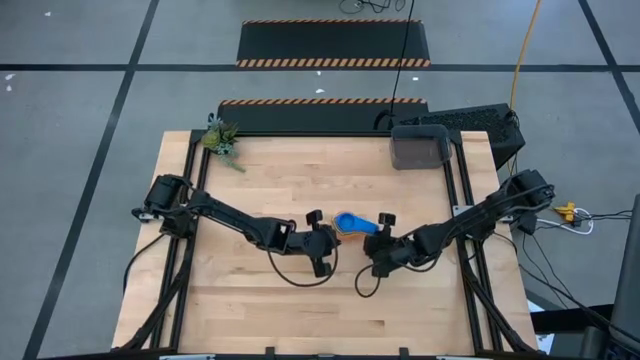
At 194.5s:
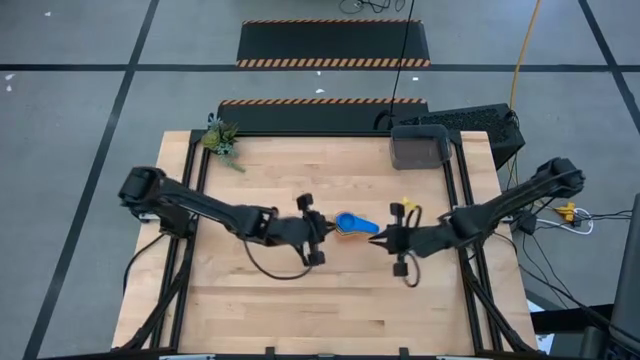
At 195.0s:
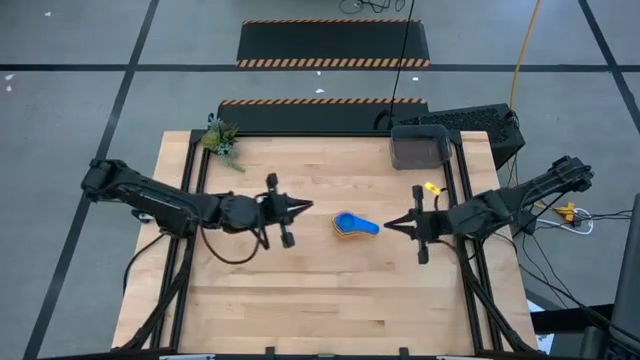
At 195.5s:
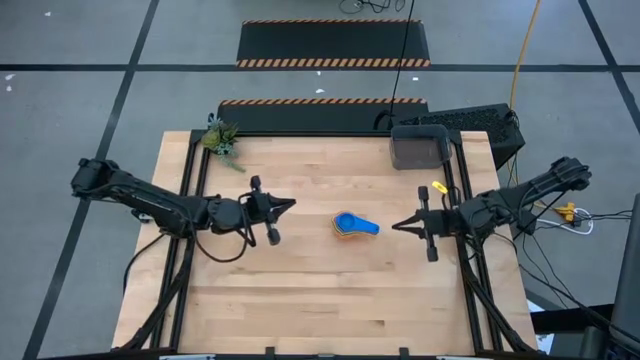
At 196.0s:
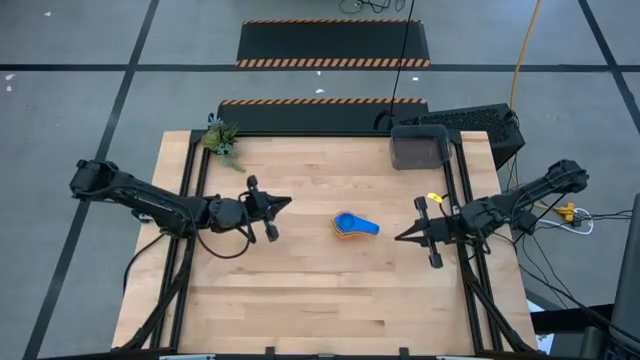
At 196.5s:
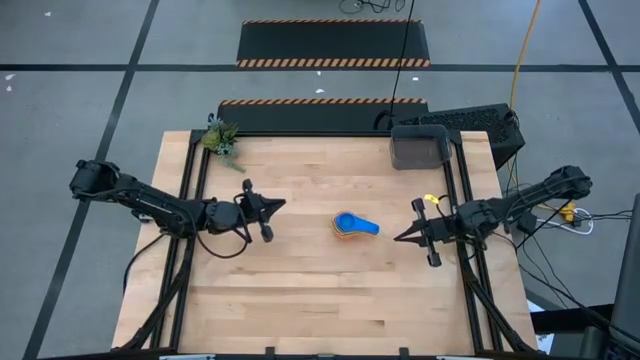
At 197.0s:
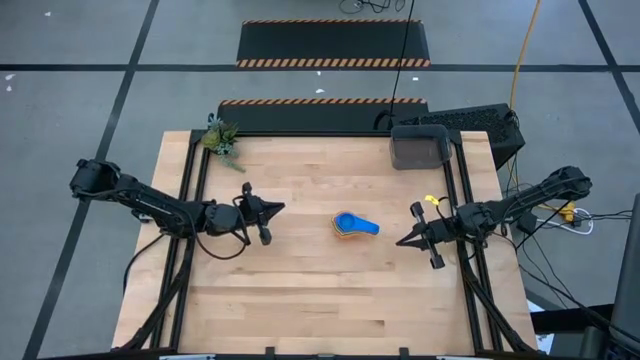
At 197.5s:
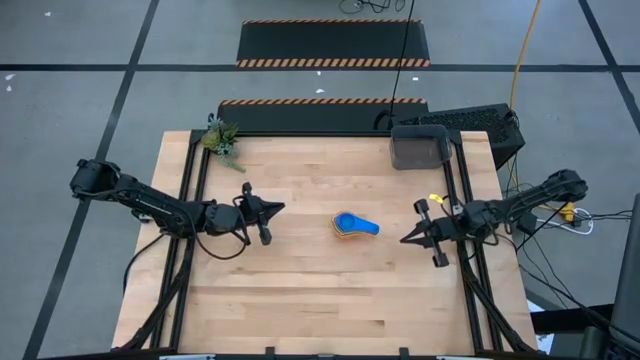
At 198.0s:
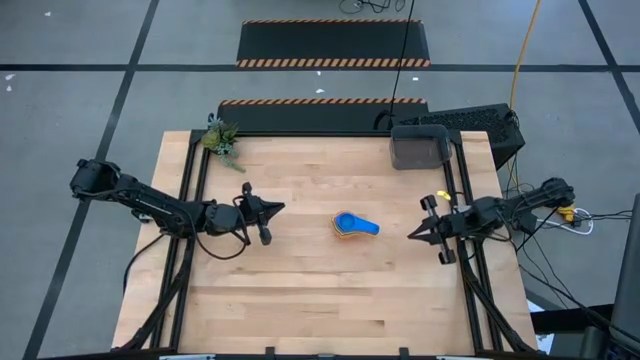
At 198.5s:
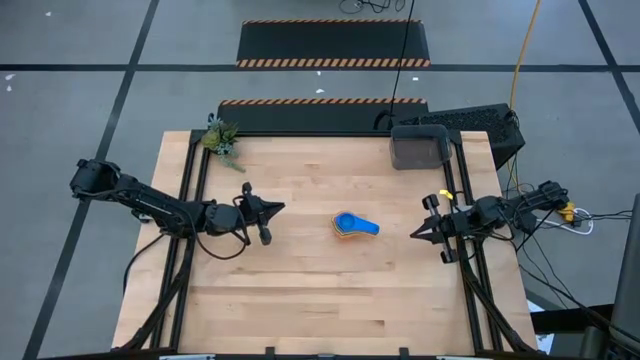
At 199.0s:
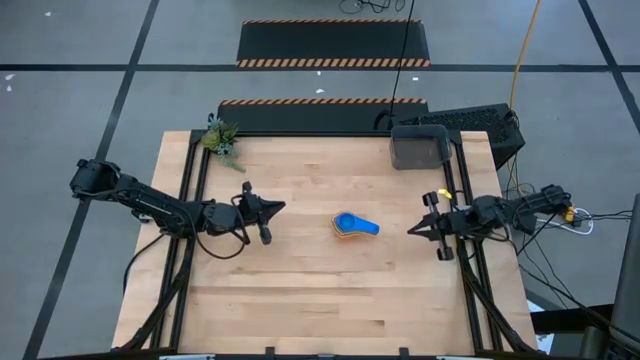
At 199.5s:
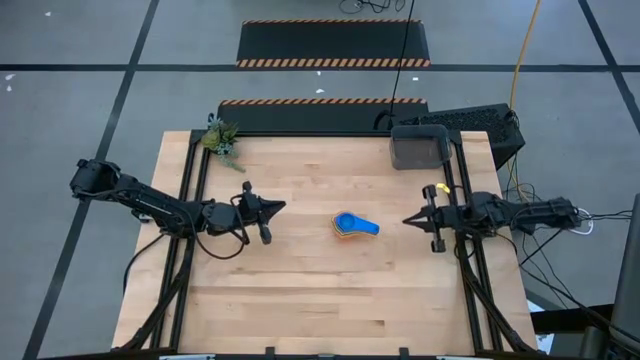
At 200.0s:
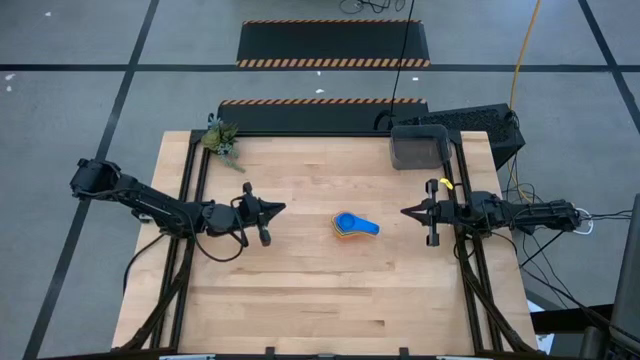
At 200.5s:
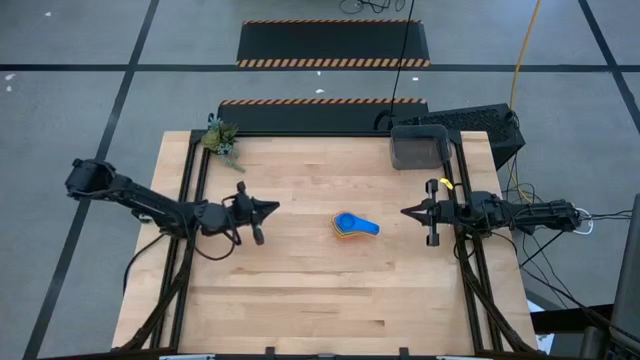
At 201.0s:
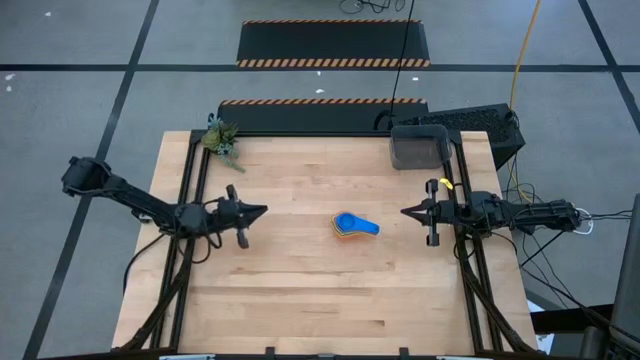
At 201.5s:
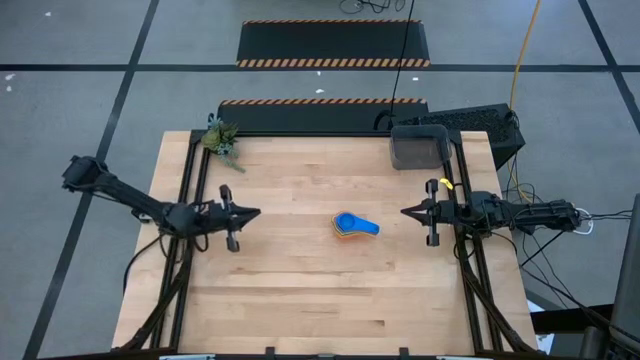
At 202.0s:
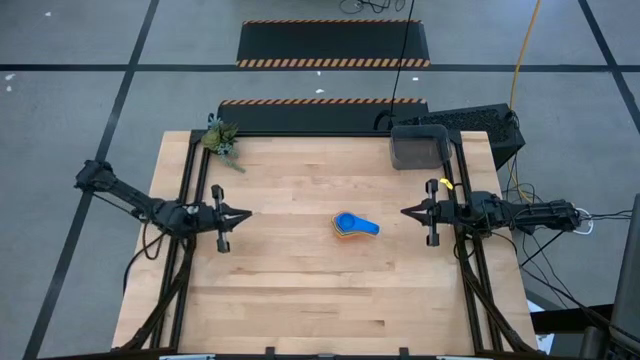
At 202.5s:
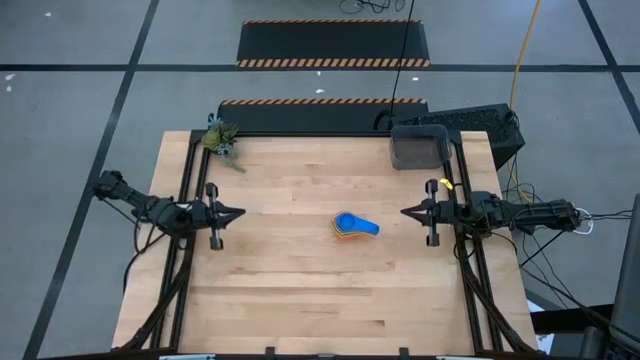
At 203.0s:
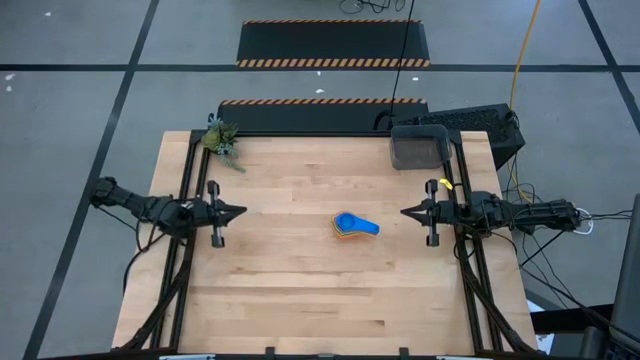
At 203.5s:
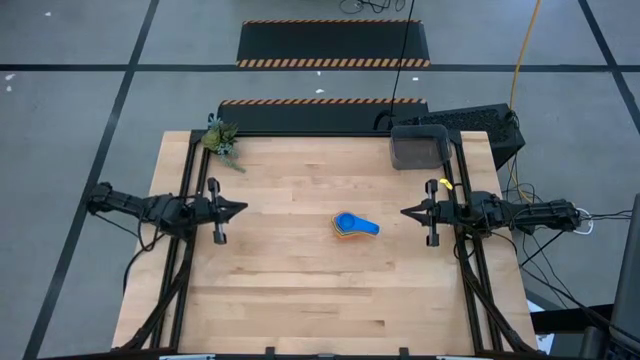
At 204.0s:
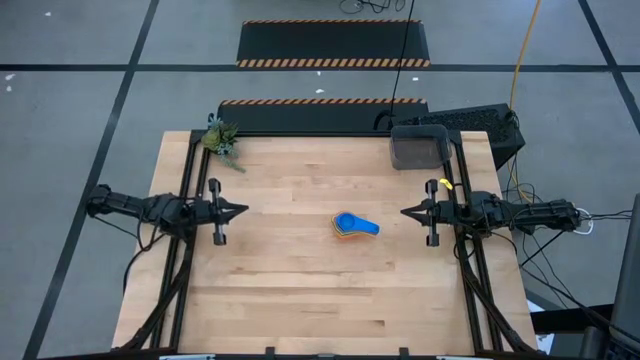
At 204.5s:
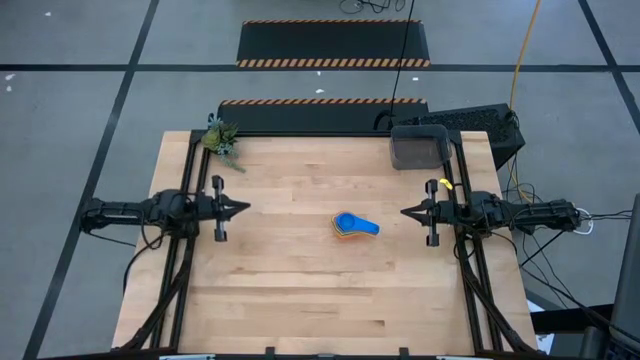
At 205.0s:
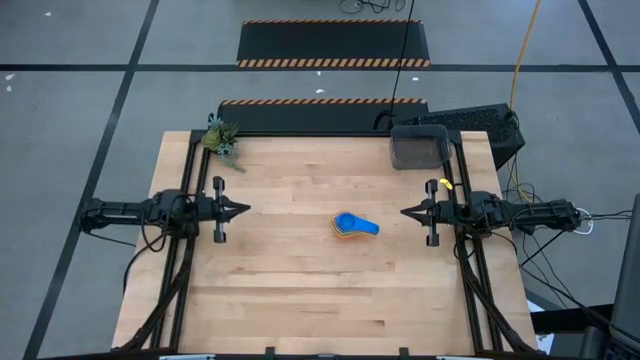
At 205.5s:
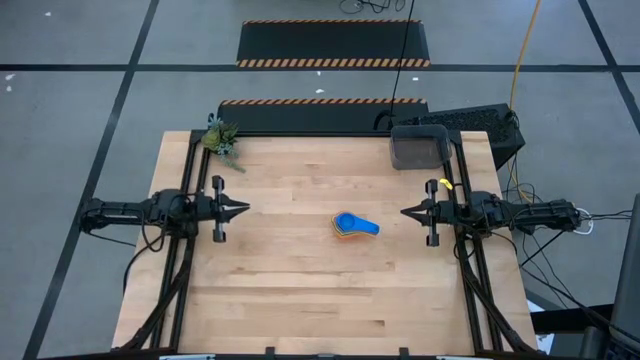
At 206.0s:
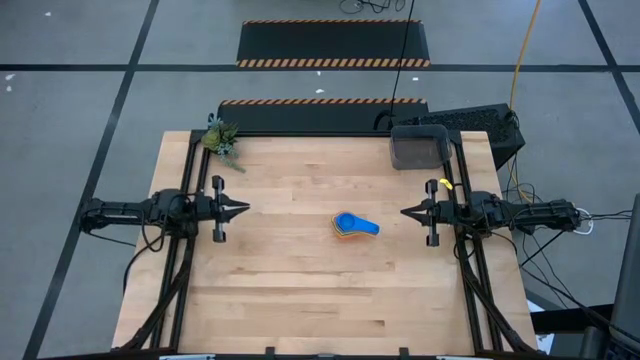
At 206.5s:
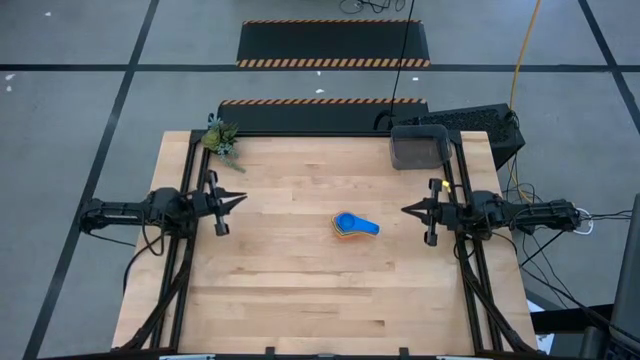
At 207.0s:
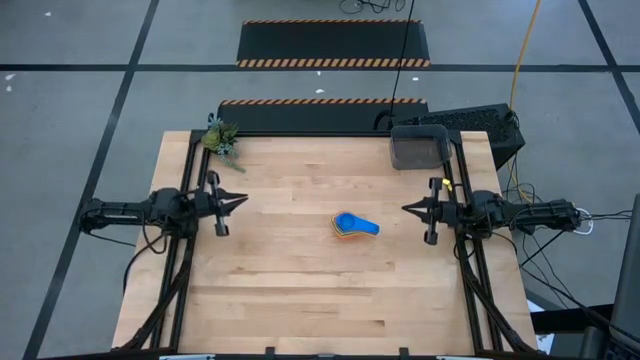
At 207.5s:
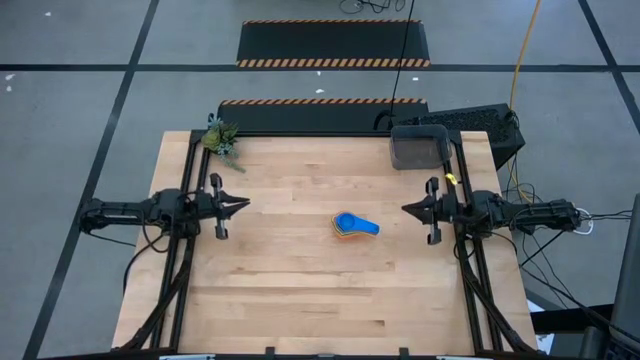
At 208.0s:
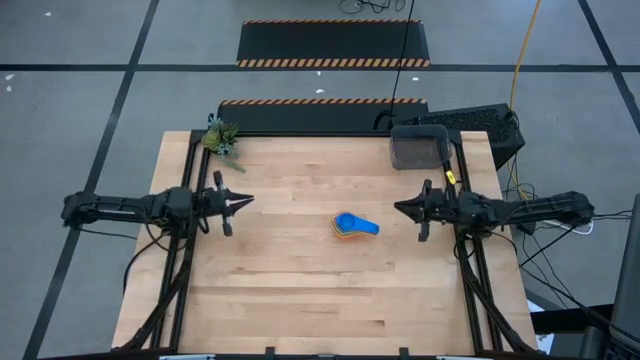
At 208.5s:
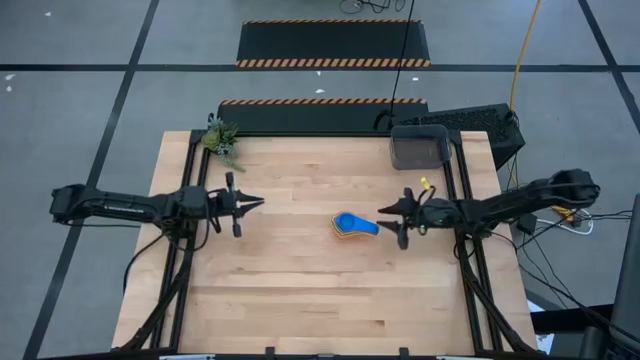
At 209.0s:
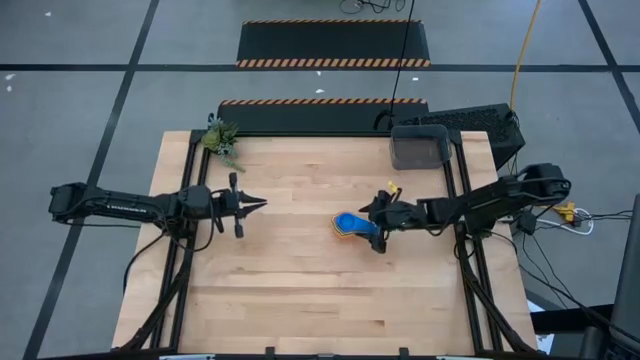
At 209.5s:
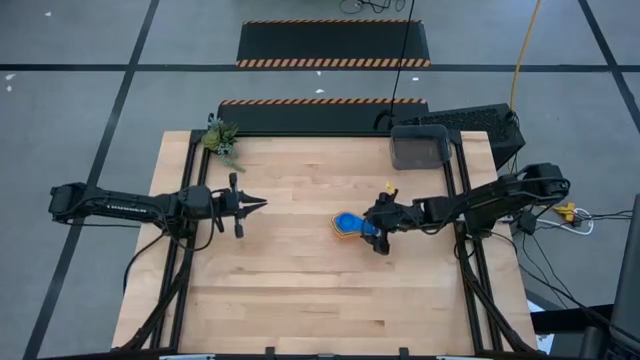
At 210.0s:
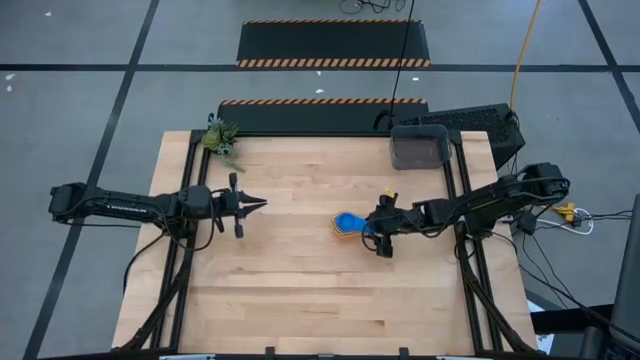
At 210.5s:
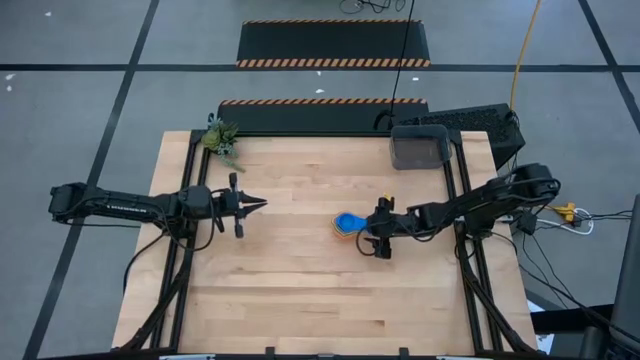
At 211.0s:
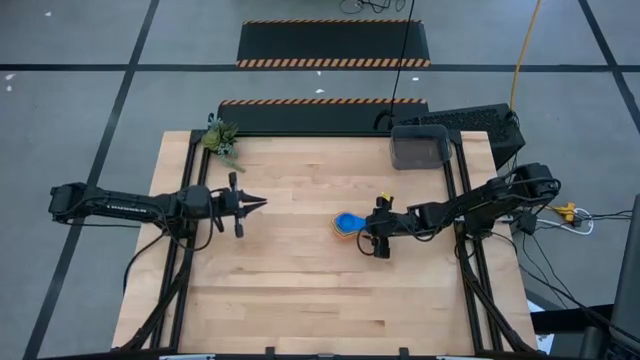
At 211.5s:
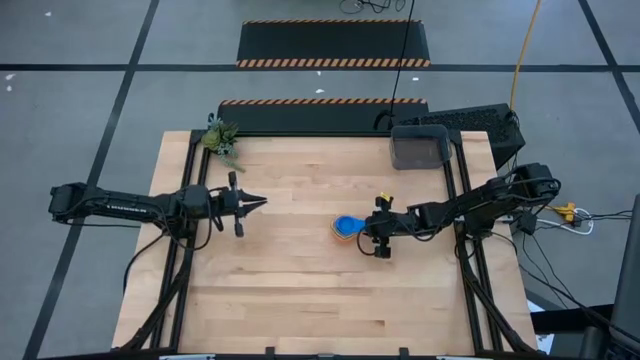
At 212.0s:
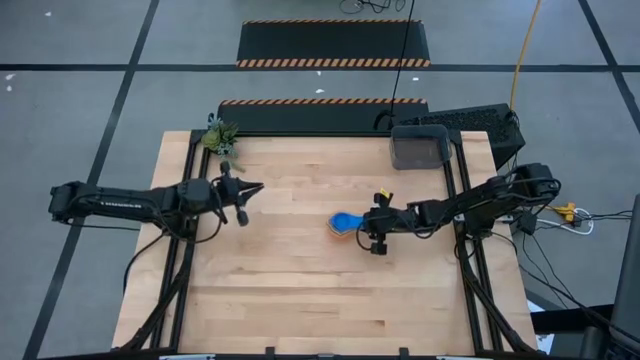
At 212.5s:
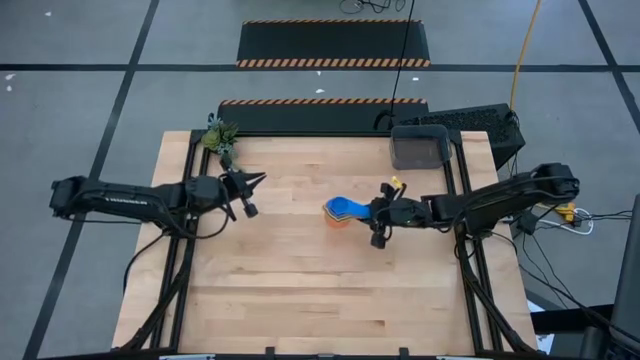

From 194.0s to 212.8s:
Task: Nest measuring cups in basket
Put the stack of measuring cups into the black bin

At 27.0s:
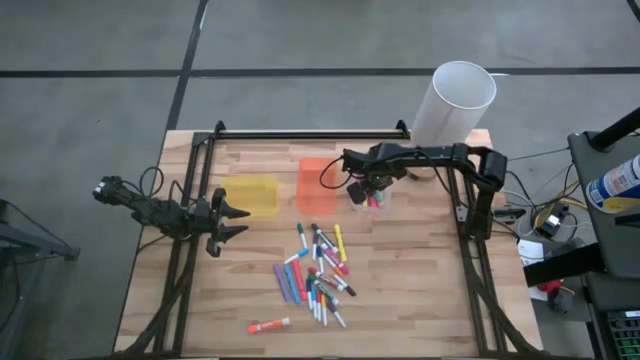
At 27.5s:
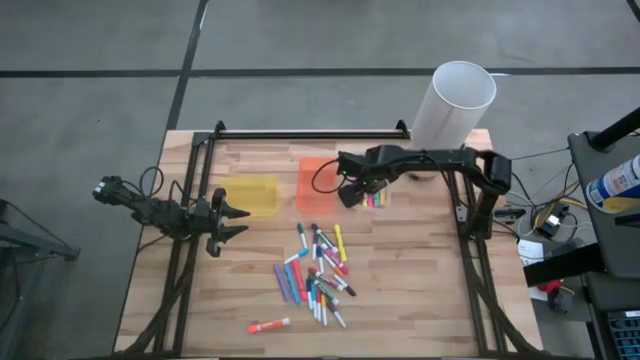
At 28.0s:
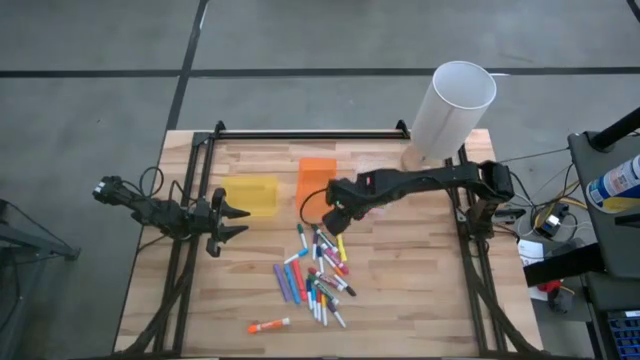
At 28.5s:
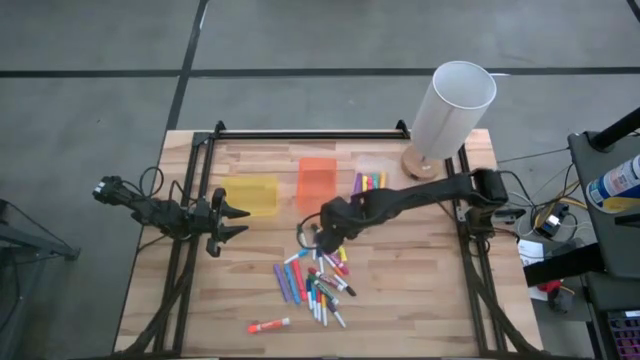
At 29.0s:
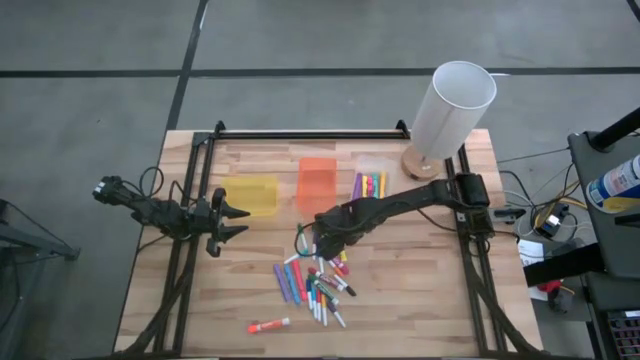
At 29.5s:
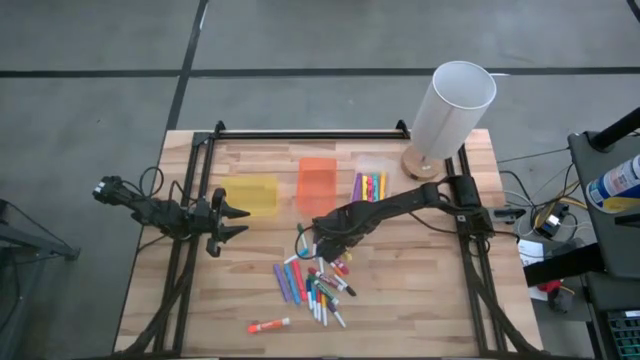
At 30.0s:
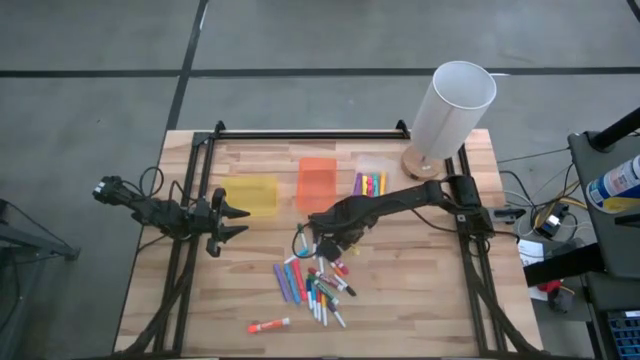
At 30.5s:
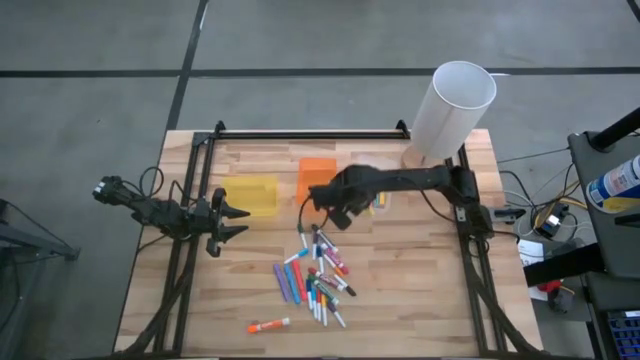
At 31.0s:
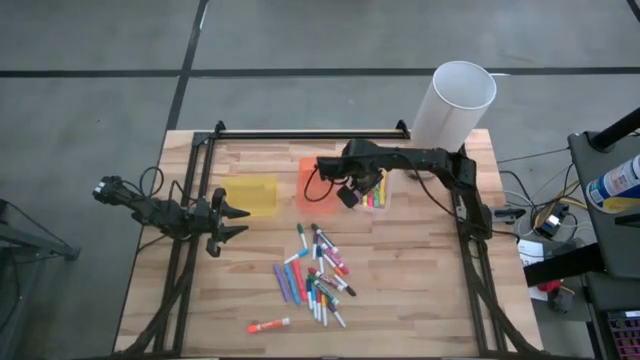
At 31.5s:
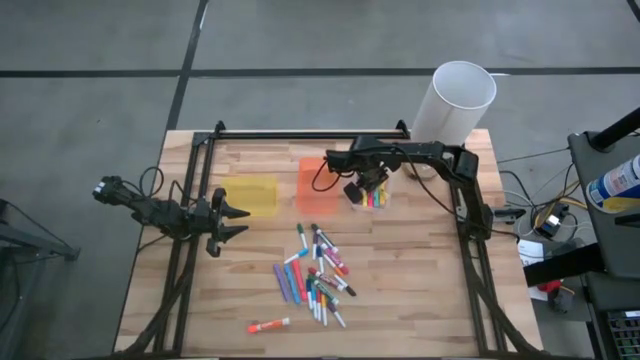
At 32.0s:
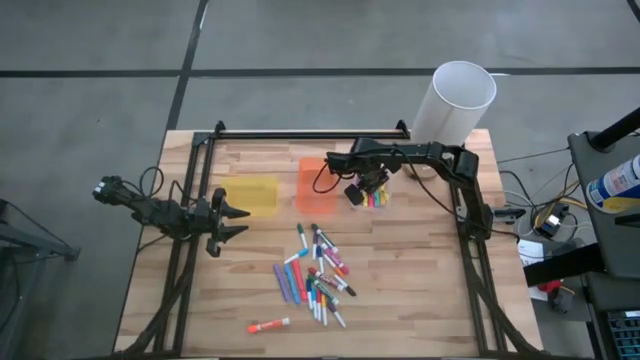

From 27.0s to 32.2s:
Task: Pick & Place Markers
Put the light yellow highlighter into the transparent bin
